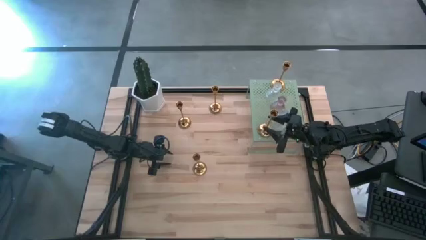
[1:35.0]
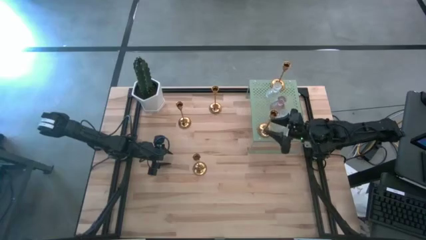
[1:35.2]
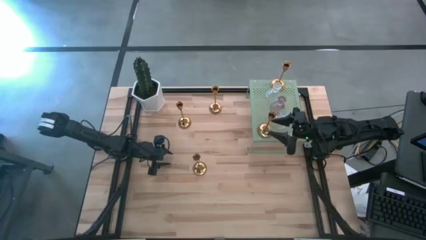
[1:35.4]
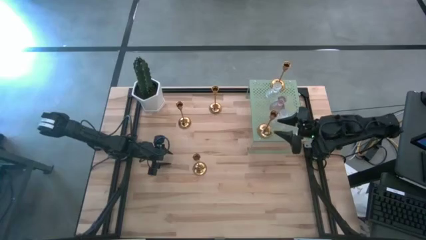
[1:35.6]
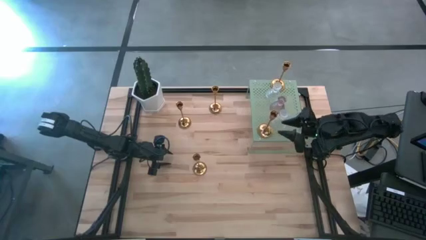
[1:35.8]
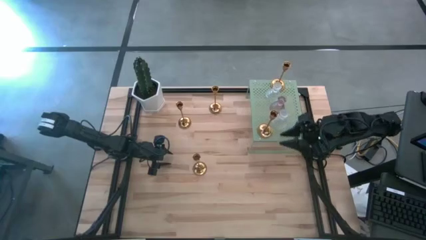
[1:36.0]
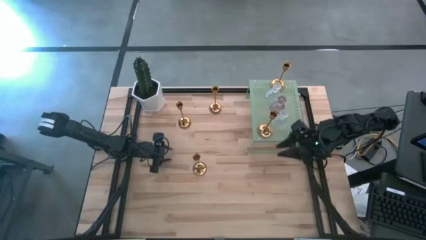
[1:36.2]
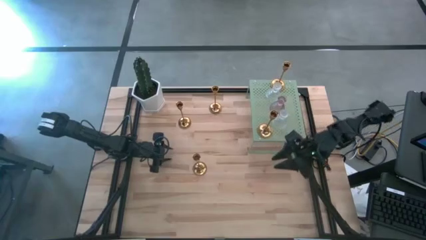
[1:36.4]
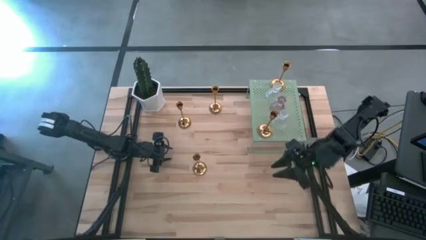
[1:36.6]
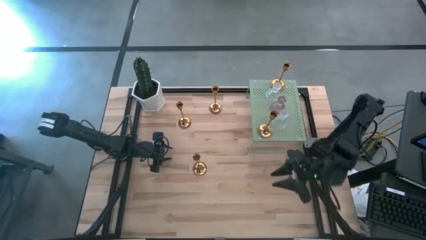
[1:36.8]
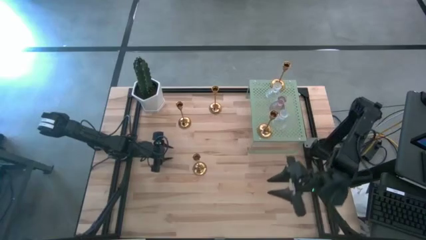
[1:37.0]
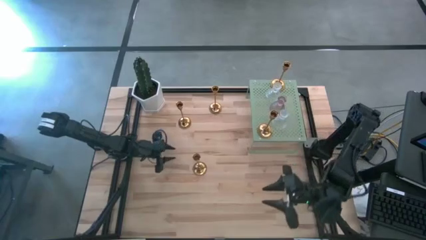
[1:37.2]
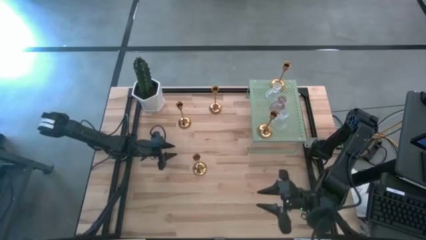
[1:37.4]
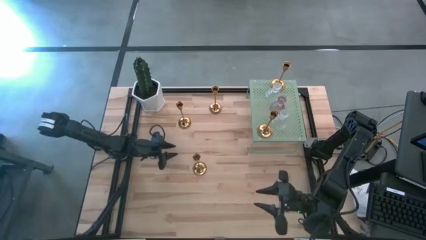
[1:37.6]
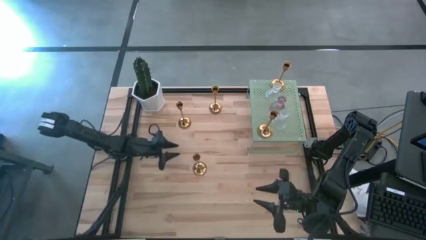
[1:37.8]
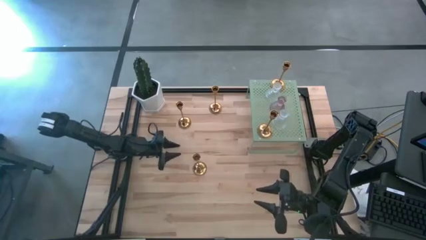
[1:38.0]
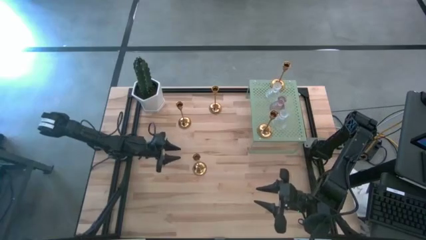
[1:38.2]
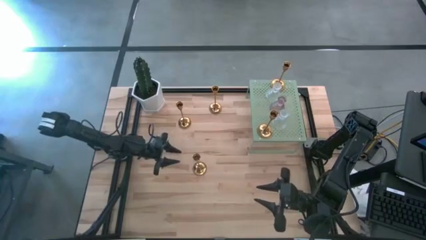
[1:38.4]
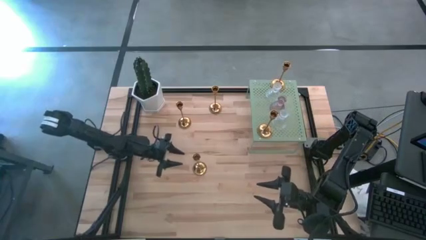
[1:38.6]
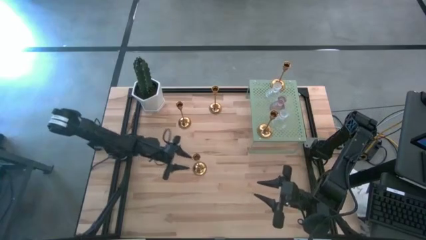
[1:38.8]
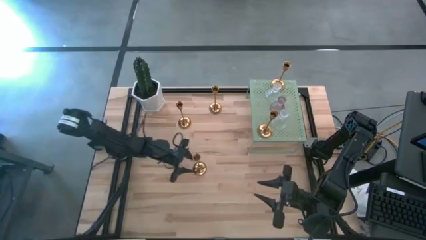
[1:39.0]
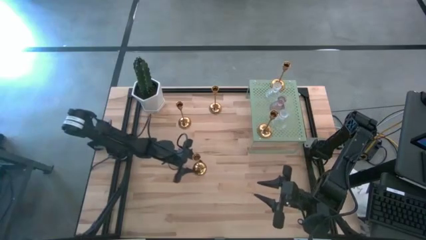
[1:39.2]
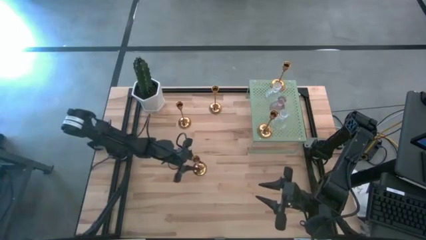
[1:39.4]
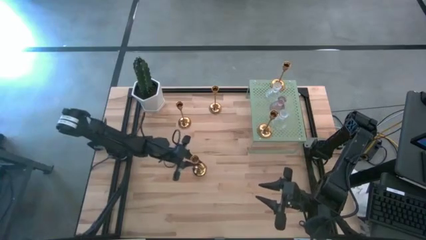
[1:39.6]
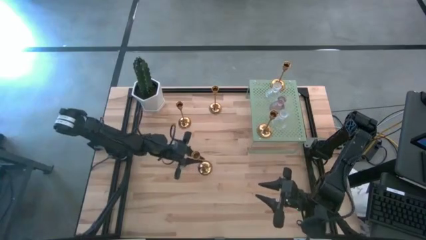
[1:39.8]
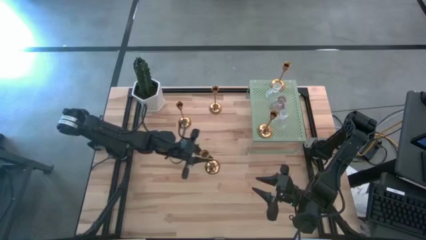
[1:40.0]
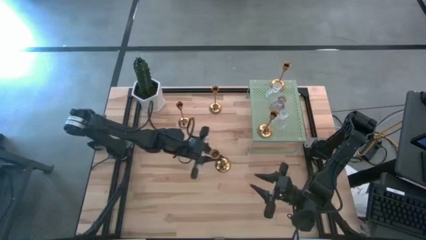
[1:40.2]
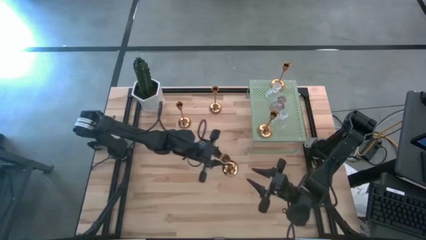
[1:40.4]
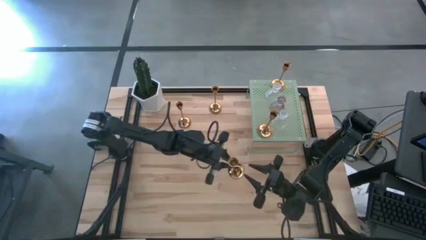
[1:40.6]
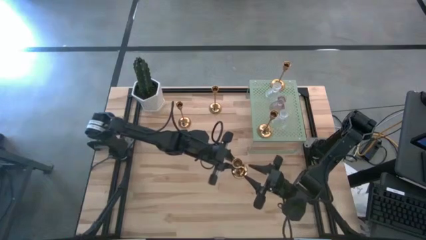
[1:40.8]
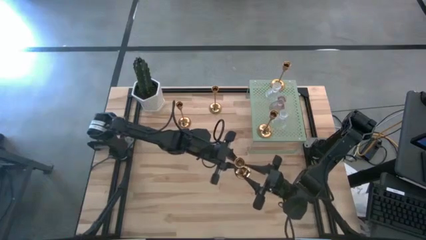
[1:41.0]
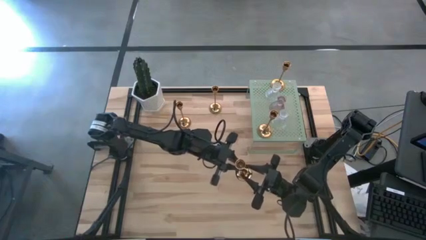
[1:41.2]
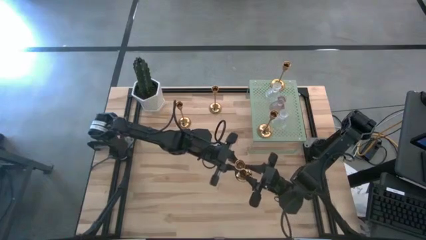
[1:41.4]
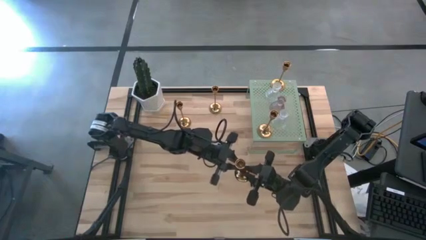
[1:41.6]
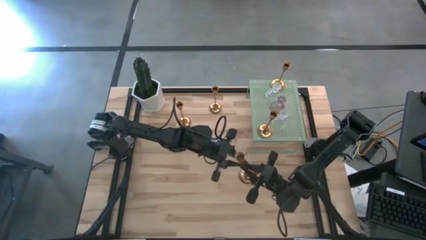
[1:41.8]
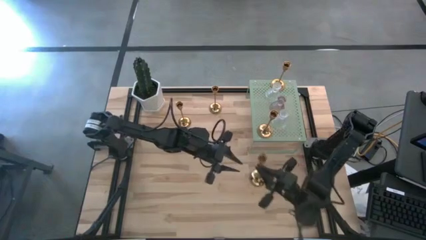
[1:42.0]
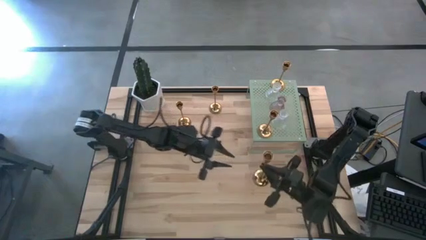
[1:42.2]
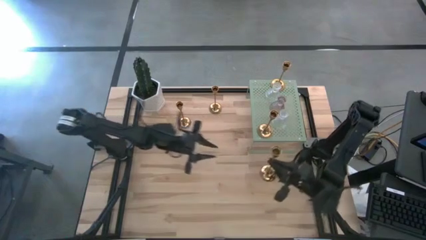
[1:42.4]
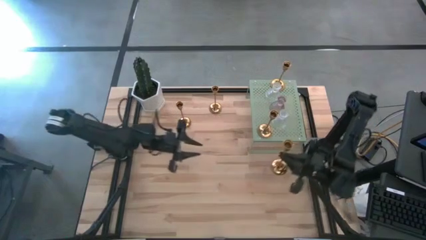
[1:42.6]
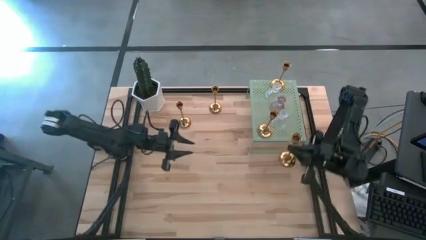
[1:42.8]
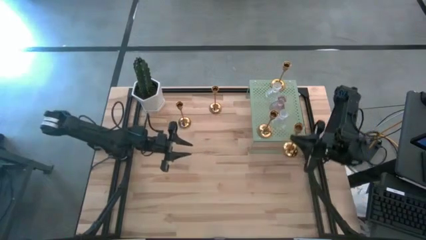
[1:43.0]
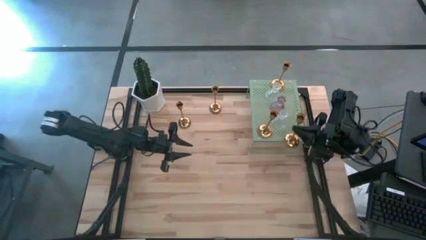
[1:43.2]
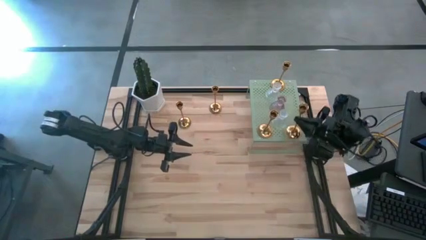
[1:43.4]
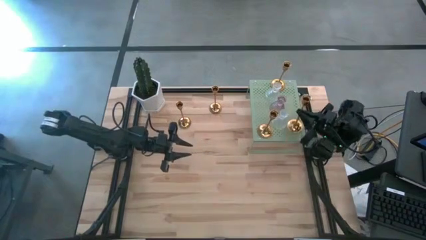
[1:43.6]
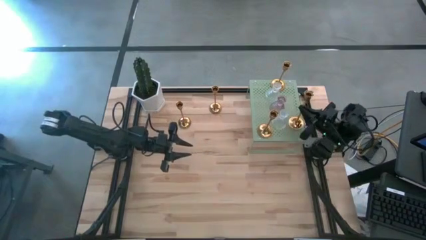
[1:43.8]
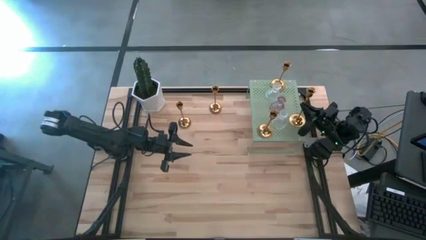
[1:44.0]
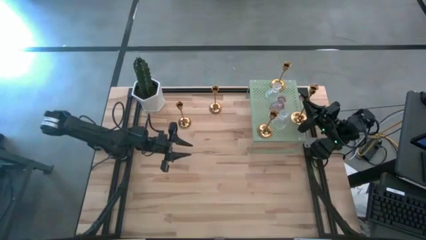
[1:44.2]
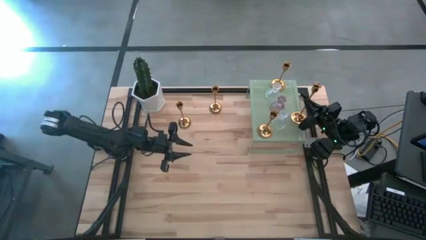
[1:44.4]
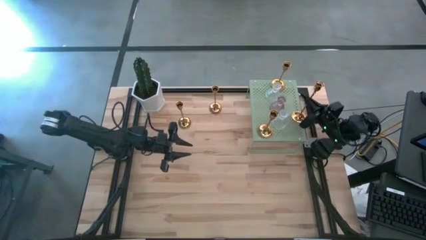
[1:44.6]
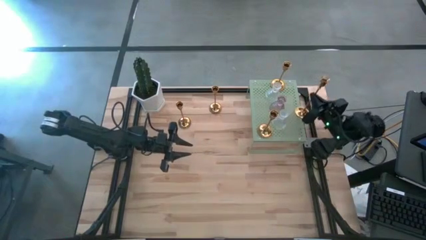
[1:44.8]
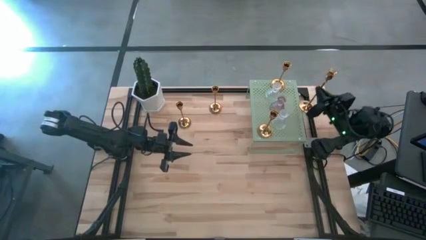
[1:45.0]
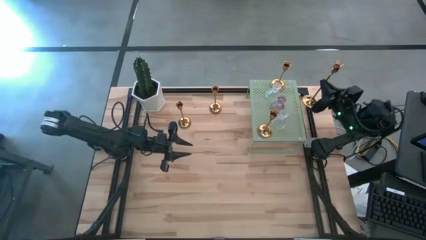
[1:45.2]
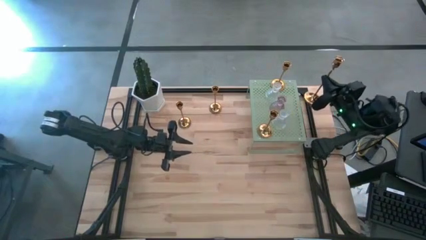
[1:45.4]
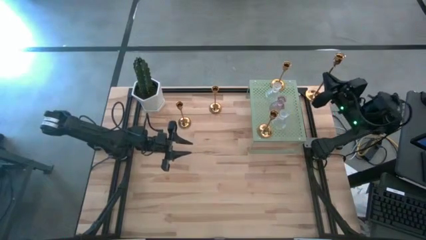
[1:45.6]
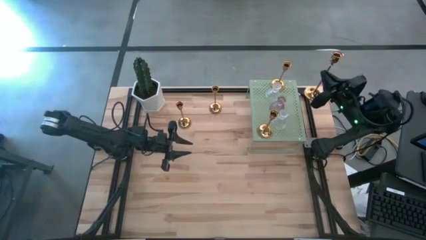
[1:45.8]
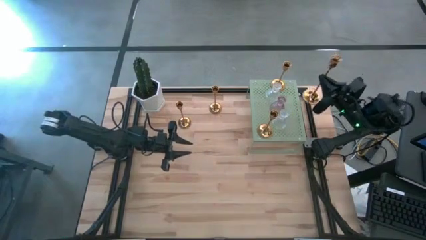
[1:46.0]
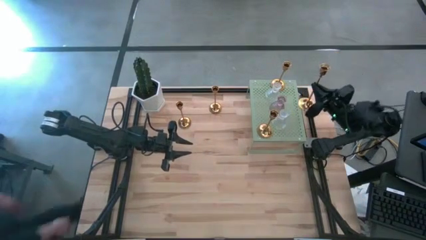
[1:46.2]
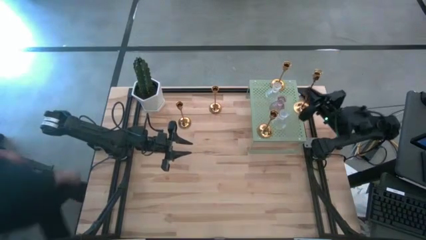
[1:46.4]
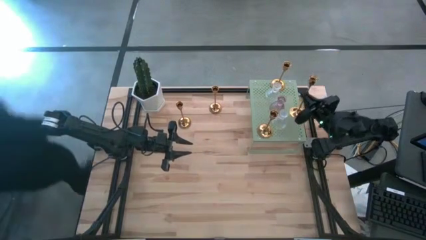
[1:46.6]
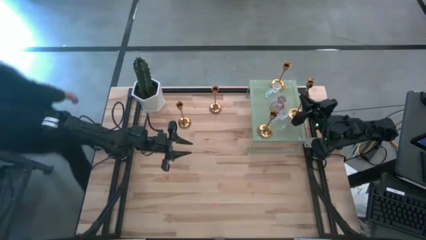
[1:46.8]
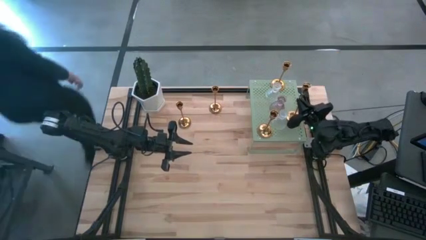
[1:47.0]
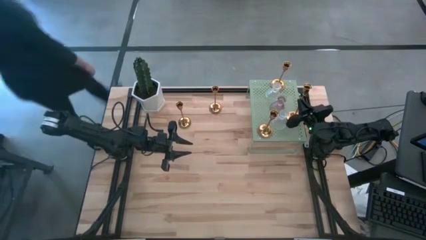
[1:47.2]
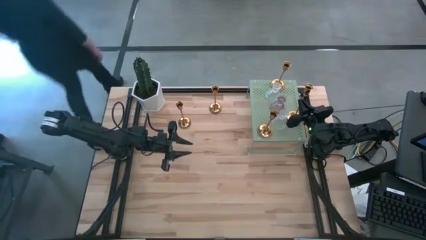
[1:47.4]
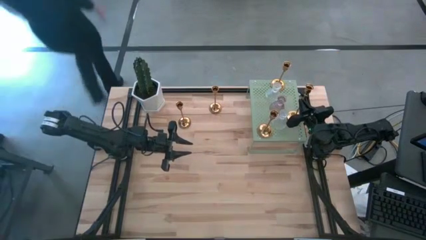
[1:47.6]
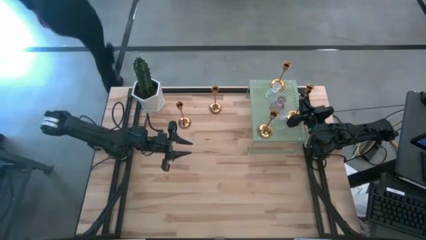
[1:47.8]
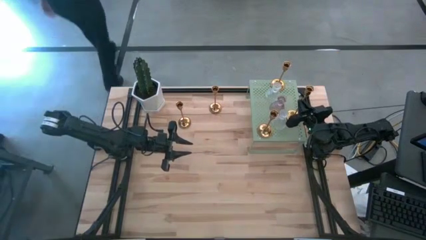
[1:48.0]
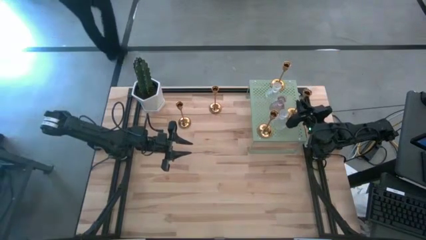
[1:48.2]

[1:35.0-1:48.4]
Task: Pick & Place candle stick holders
Put the gold candle holder on the shelf

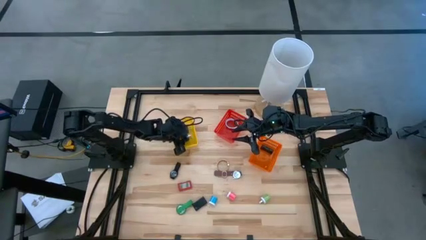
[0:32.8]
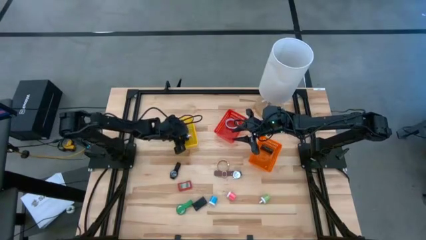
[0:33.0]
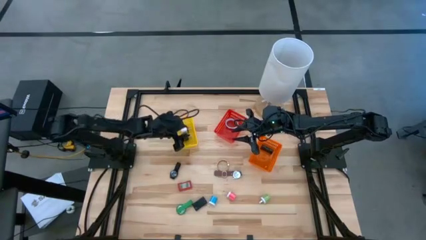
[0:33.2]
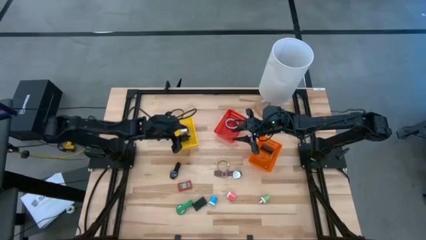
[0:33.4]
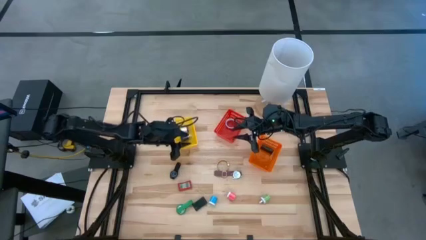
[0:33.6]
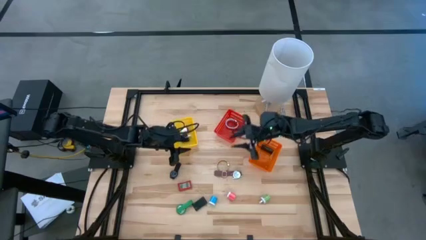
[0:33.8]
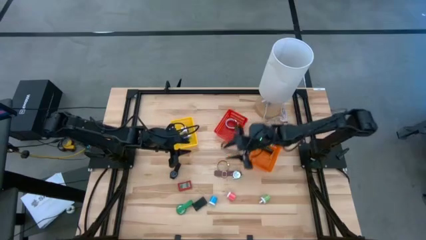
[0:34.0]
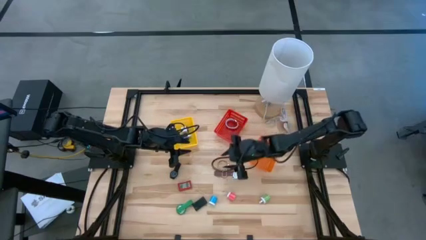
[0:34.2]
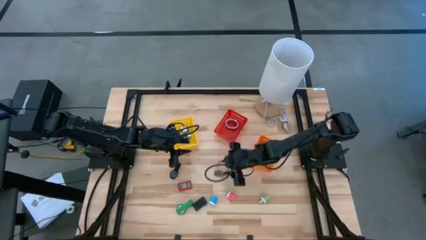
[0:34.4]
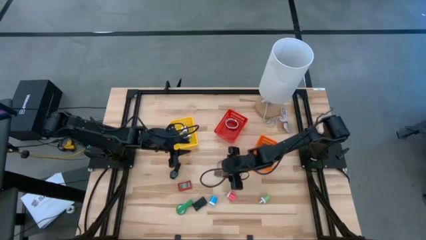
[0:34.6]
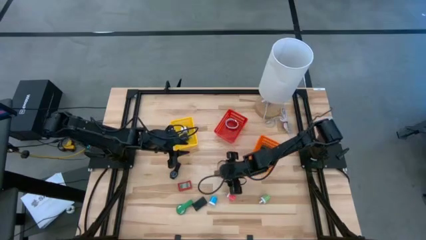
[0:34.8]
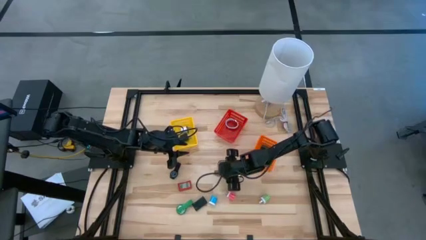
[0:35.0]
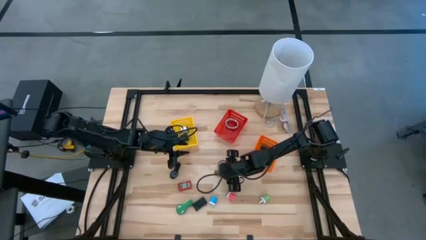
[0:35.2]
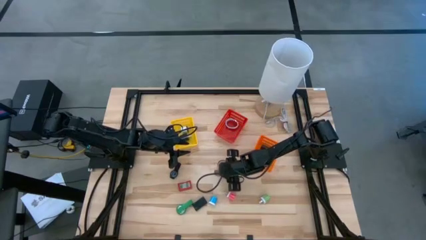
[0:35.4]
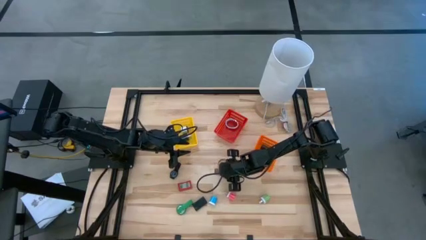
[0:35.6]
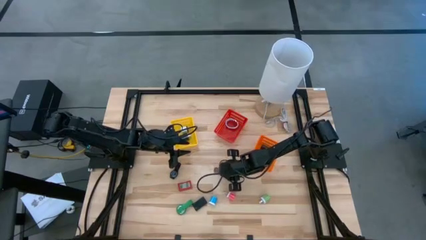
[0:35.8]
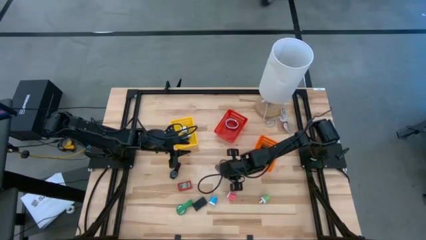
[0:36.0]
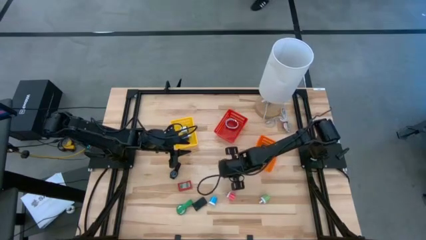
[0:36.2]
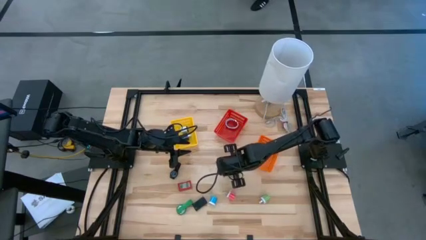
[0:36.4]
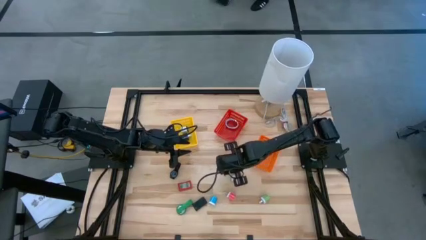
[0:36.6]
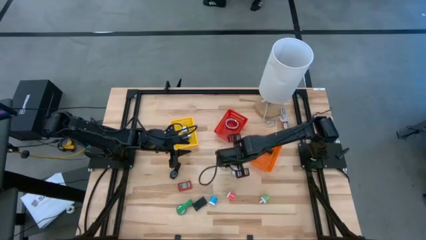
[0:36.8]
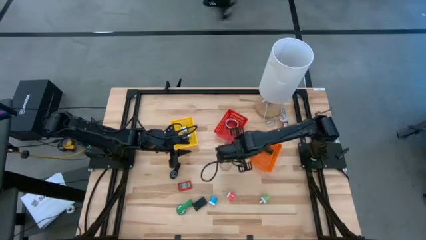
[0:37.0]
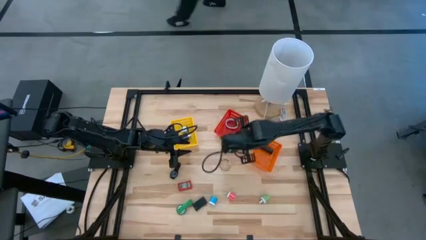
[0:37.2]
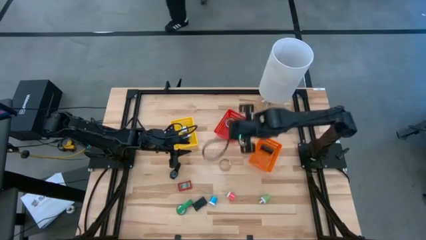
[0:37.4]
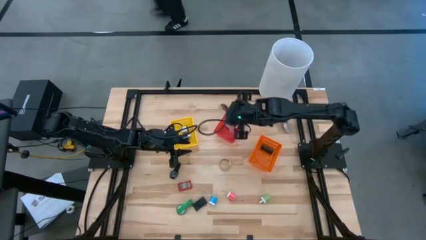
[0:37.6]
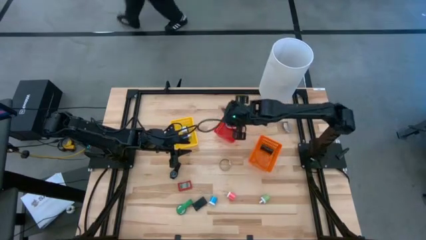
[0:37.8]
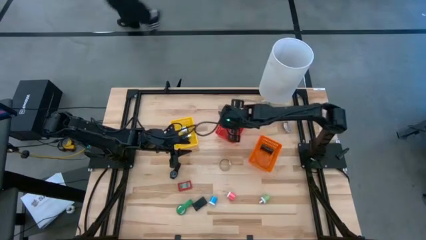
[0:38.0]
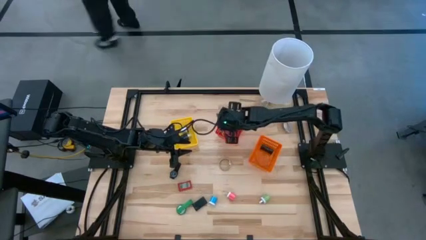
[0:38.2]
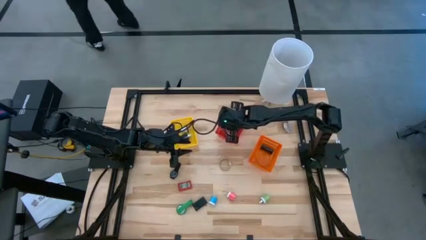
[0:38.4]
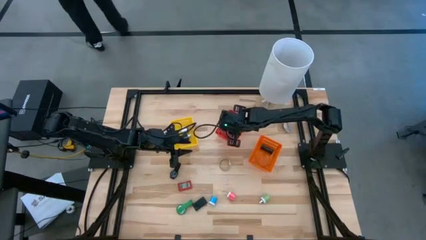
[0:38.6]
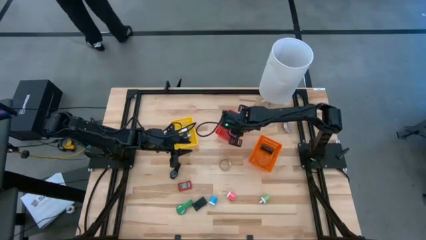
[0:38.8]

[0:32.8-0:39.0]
Task: Pick & Place Office items
Put the purple watch into the red basket
